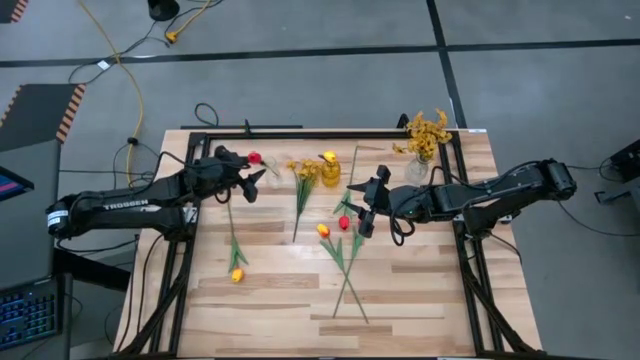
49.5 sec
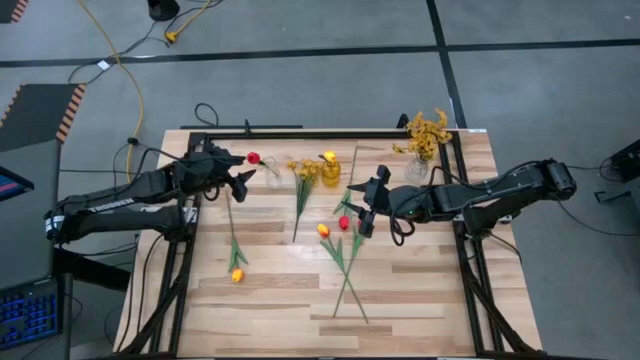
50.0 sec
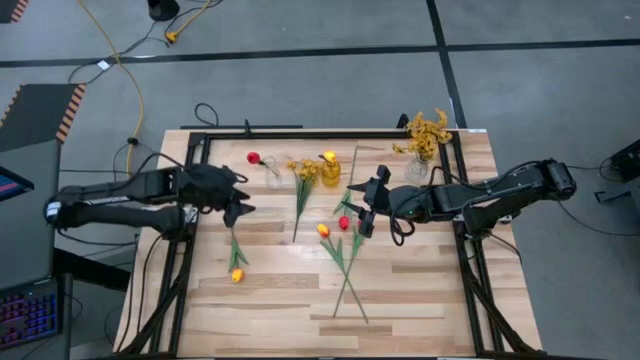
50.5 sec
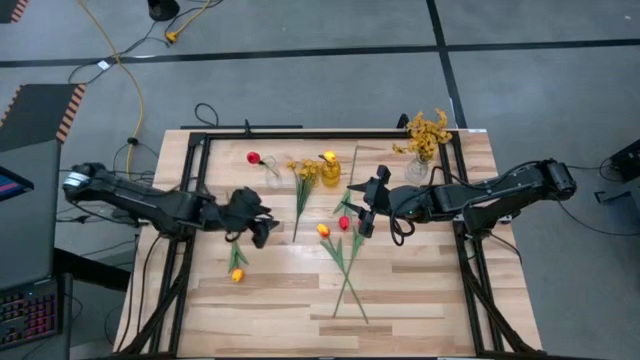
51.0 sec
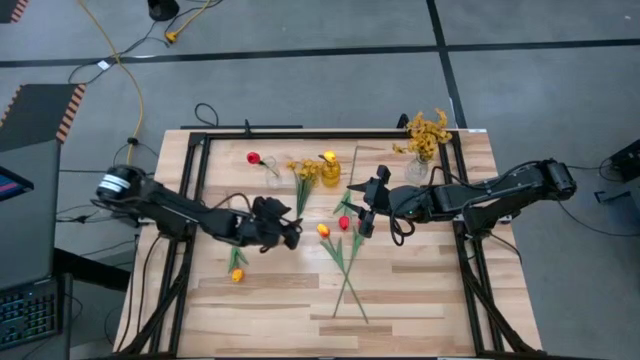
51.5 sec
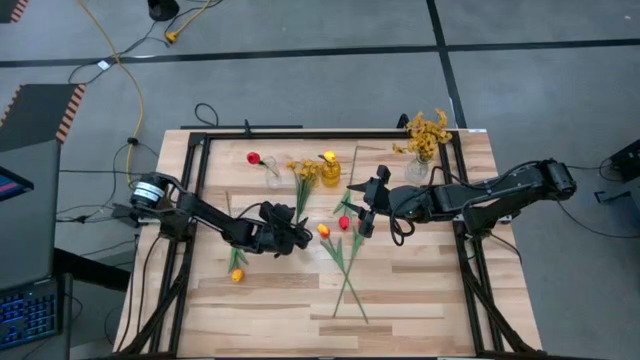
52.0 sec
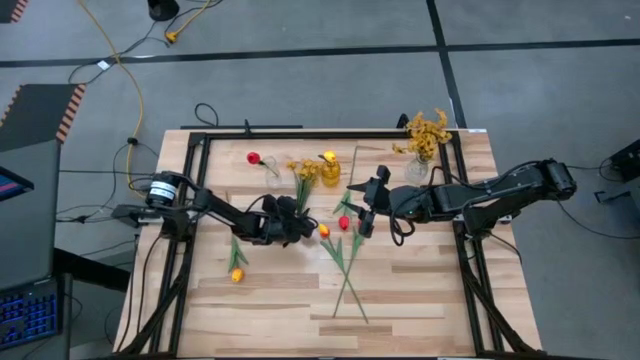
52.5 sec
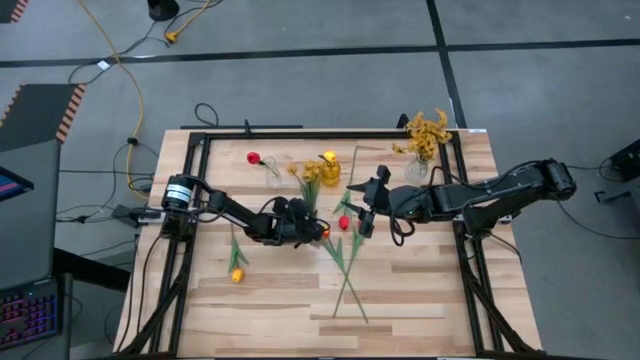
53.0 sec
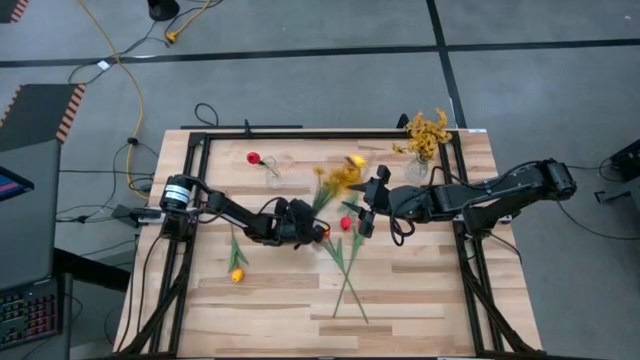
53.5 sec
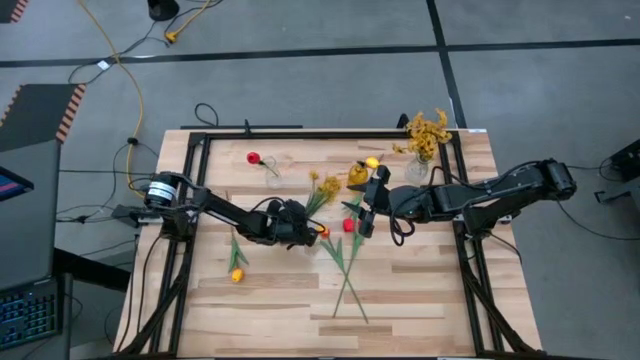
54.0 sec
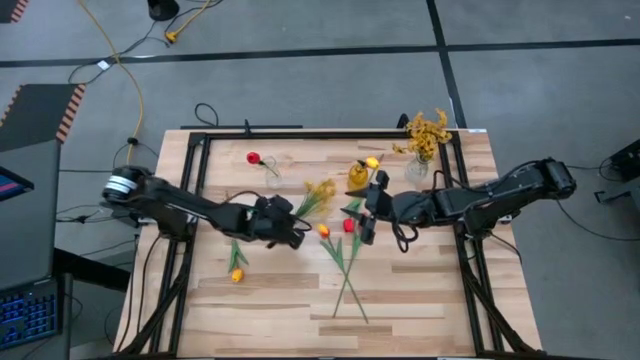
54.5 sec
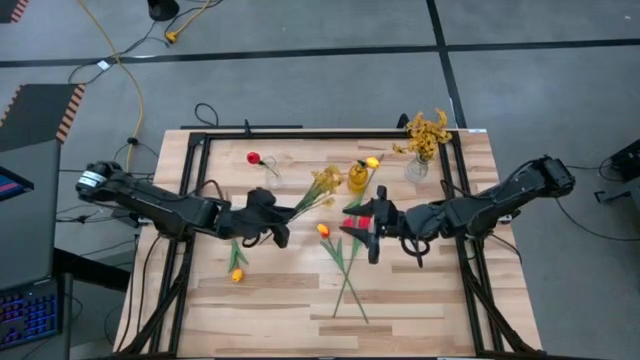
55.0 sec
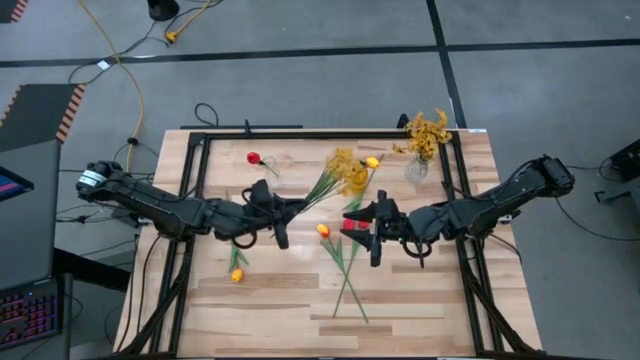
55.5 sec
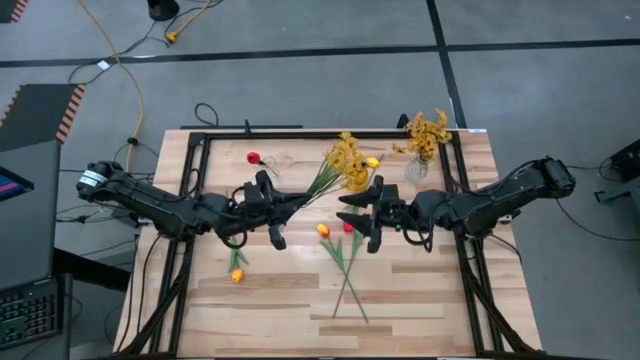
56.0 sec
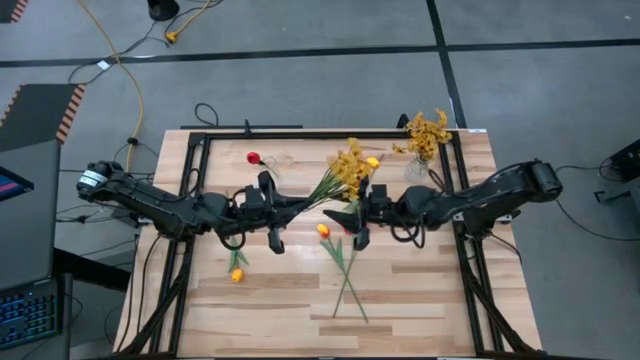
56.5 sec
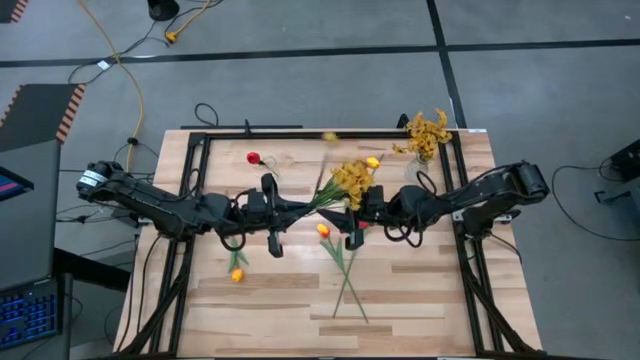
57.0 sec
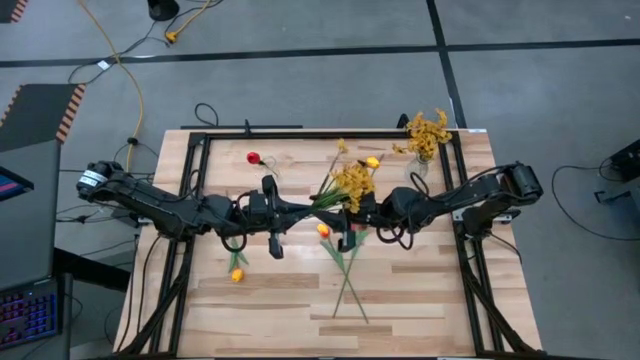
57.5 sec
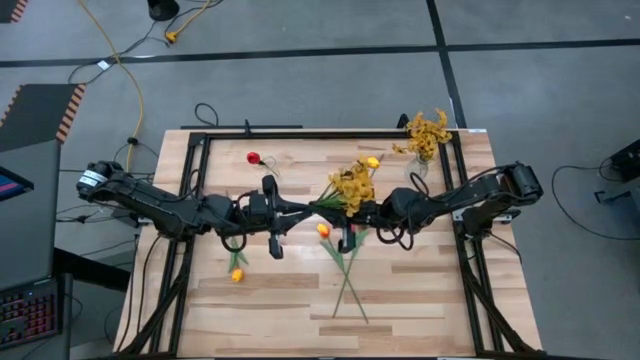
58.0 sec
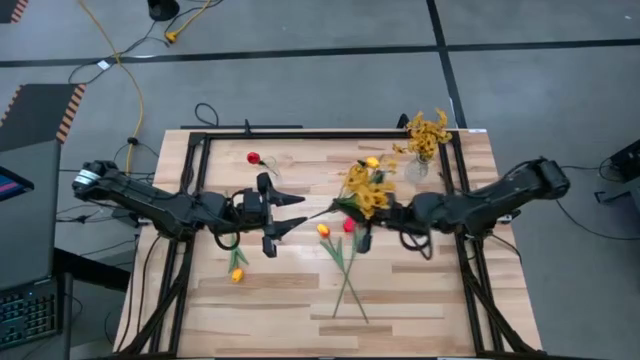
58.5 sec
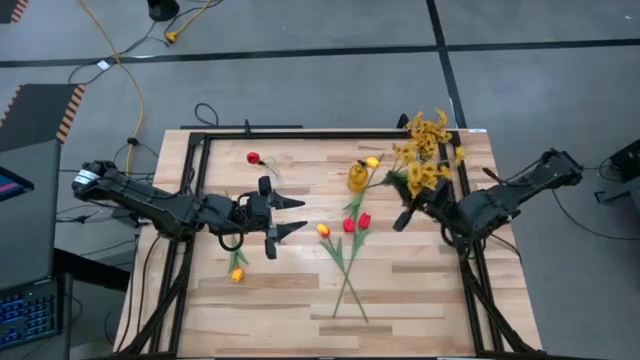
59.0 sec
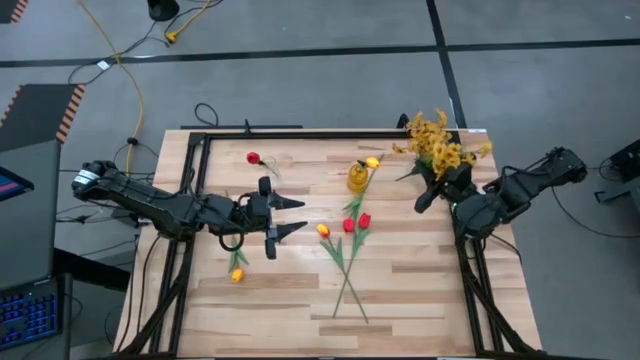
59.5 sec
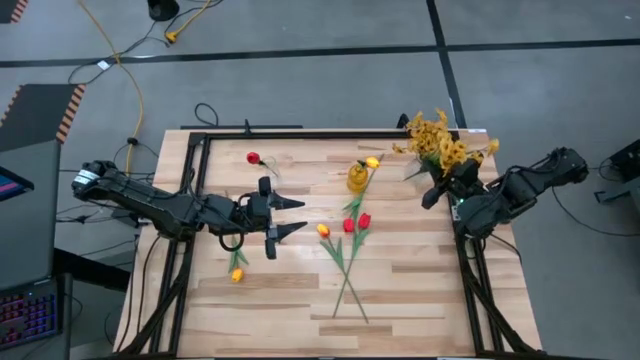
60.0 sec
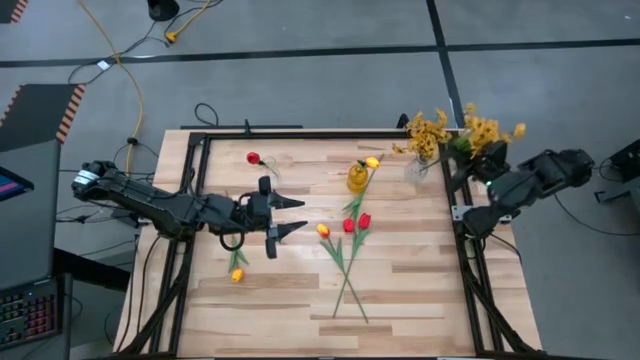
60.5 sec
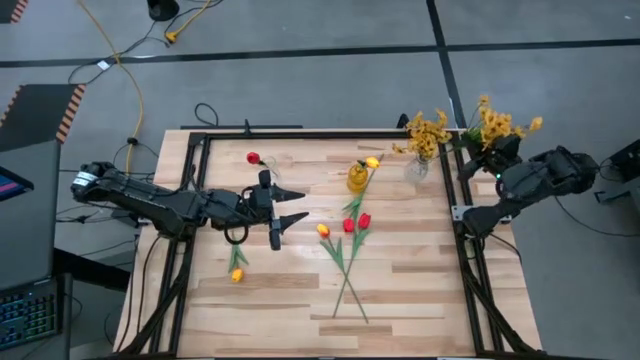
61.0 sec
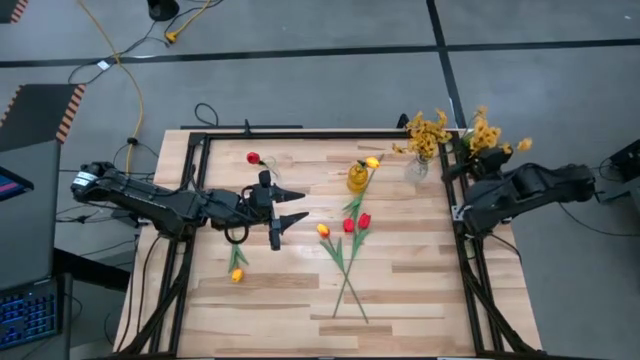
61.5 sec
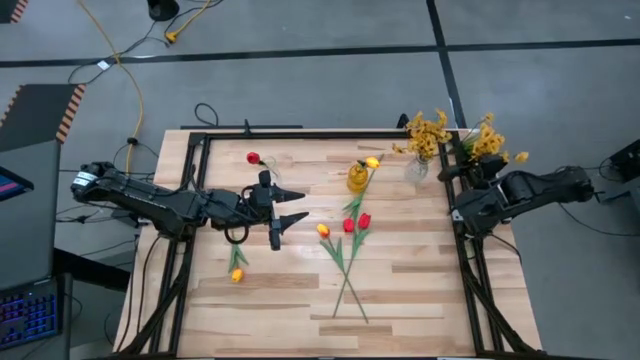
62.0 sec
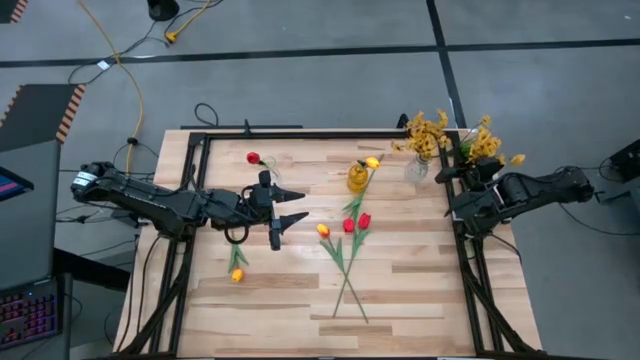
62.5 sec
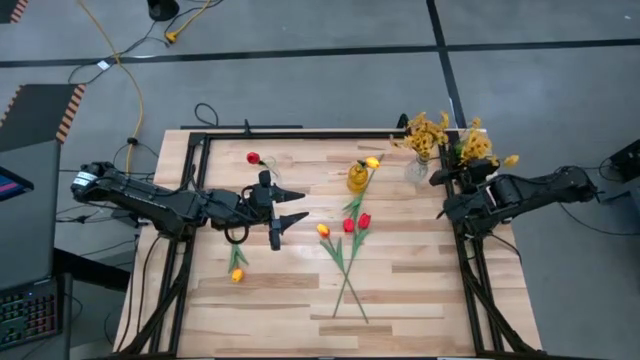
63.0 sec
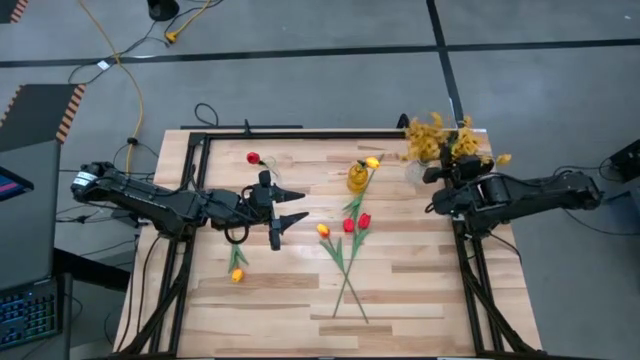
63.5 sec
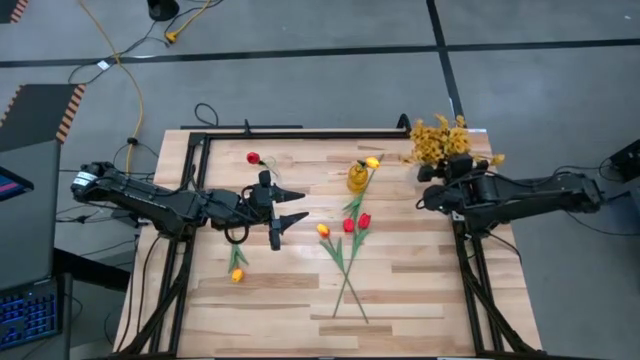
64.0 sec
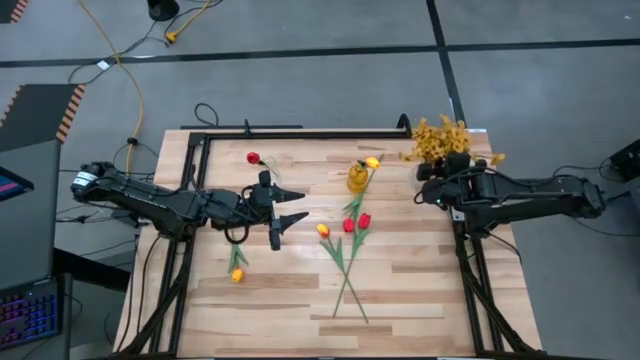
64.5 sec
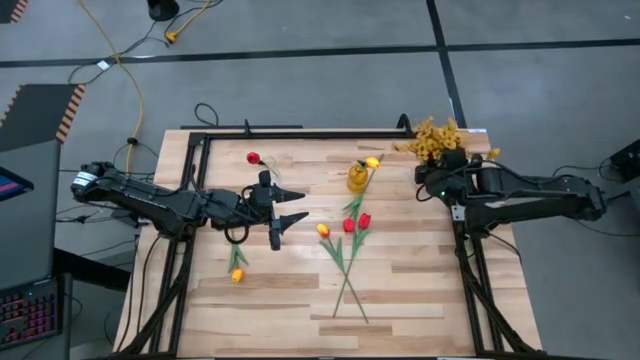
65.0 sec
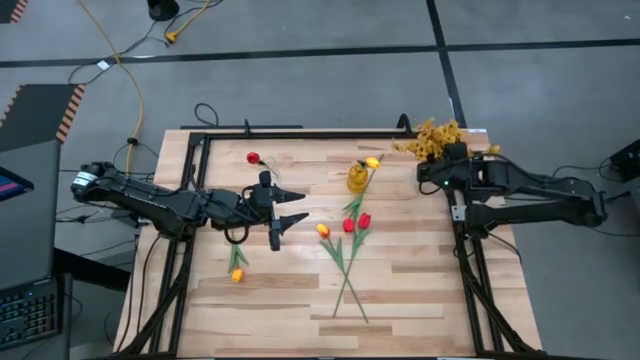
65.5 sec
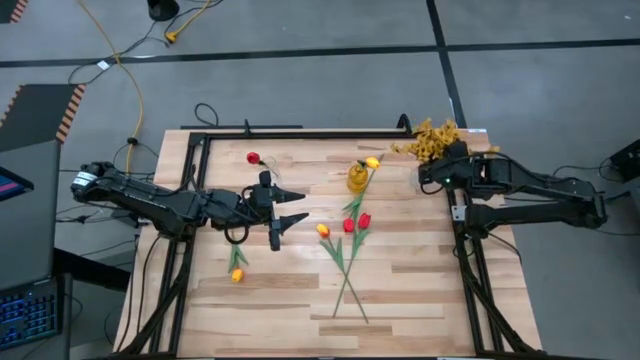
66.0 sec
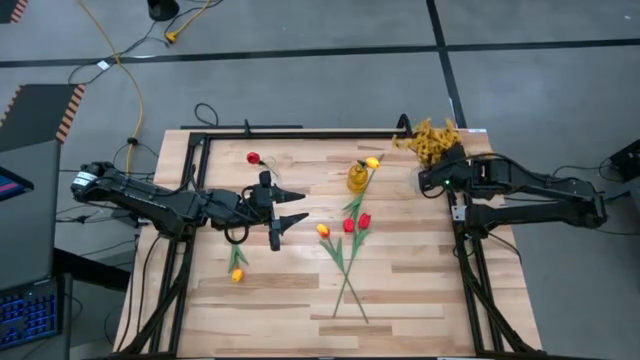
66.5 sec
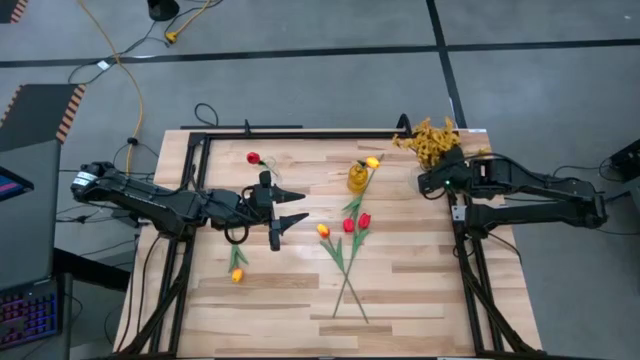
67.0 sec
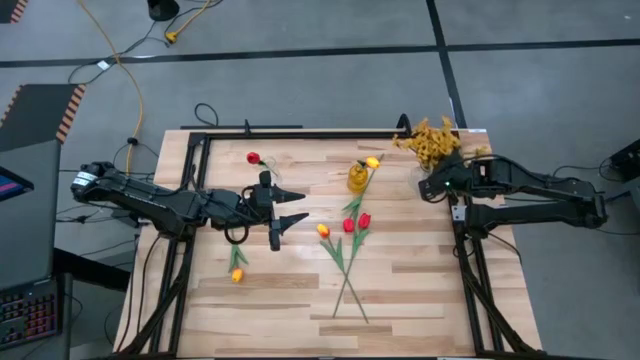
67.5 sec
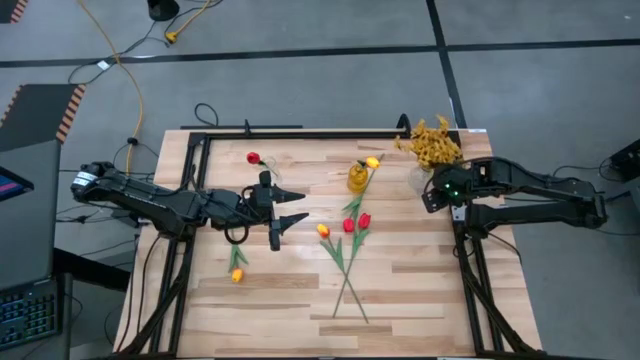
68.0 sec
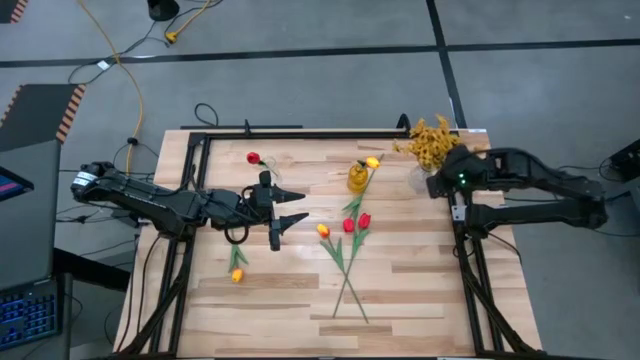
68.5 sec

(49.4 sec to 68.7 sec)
Task: Sort flowers into vase by color
Put the yellow flowers into the right transparent flower vase

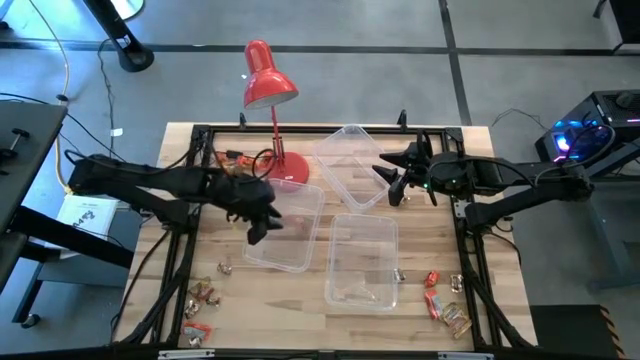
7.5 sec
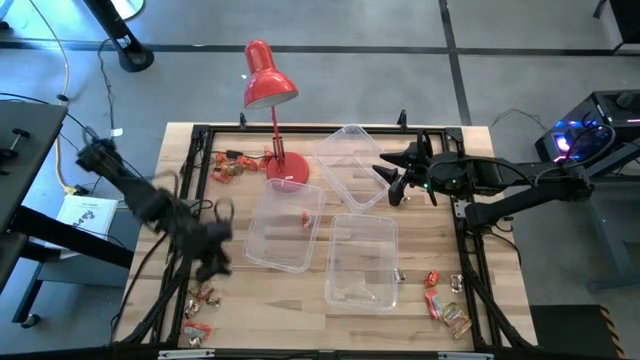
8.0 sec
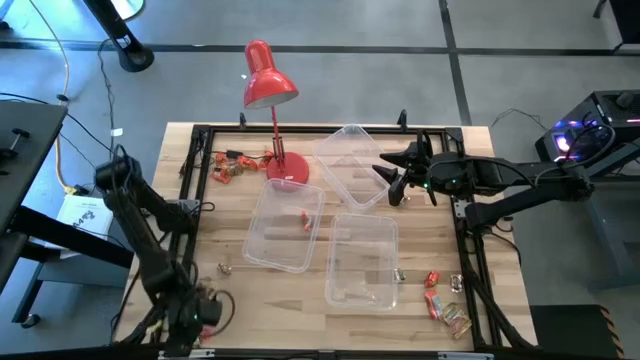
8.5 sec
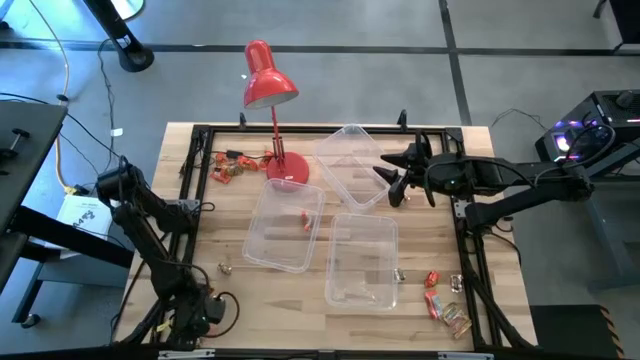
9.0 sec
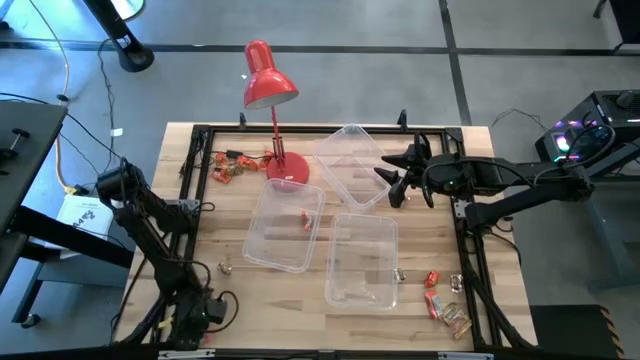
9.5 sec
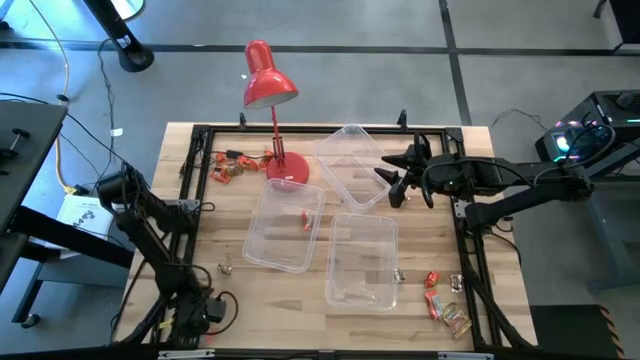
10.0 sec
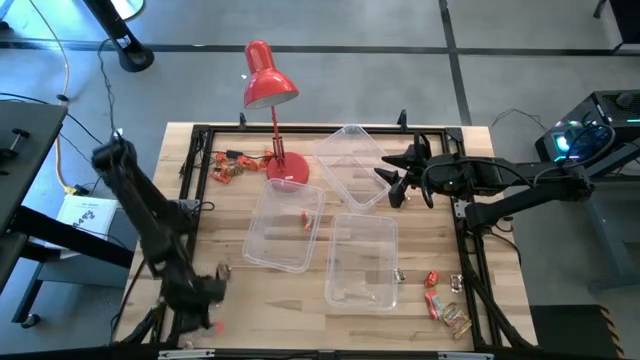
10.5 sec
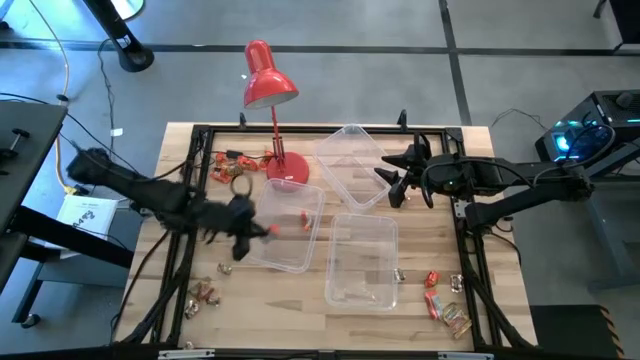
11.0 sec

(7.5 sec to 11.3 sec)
Task: Sort candy
Put the orange chocolate bar into the bottom transparent bin
